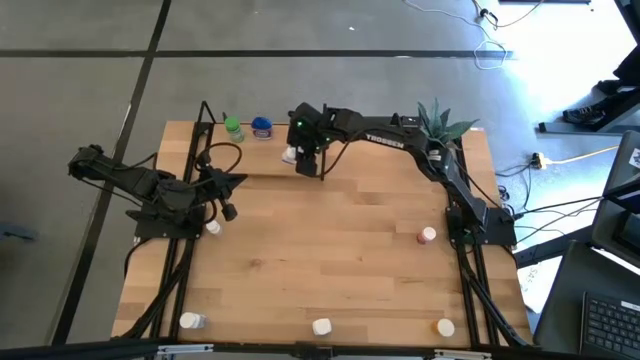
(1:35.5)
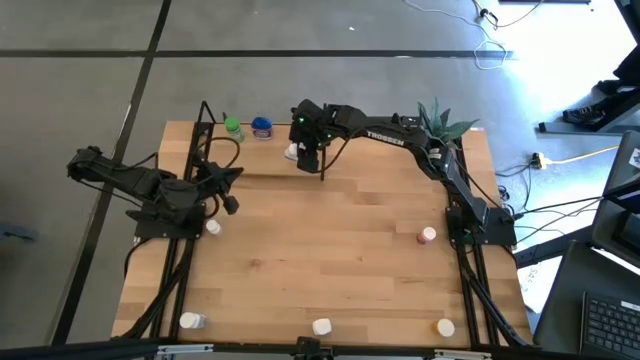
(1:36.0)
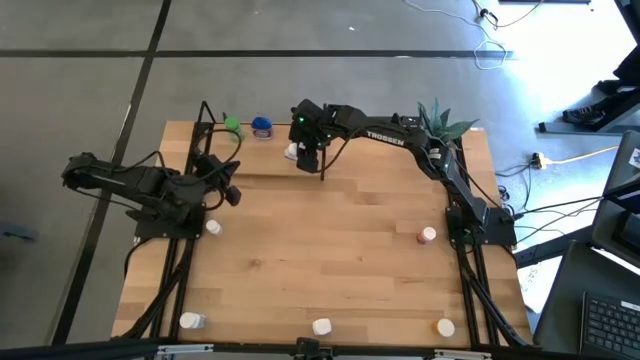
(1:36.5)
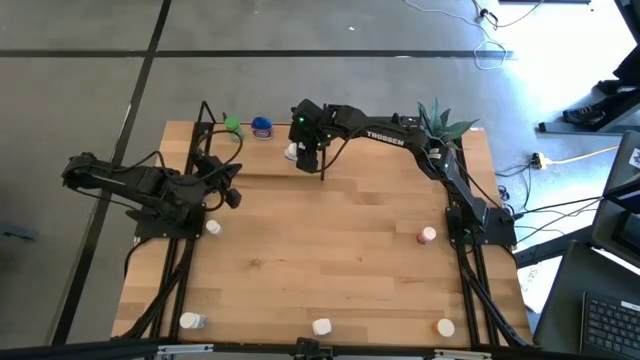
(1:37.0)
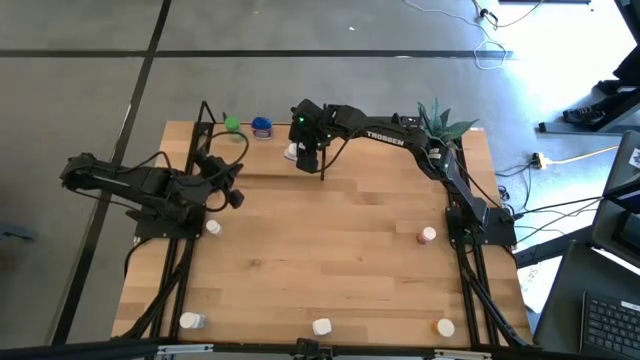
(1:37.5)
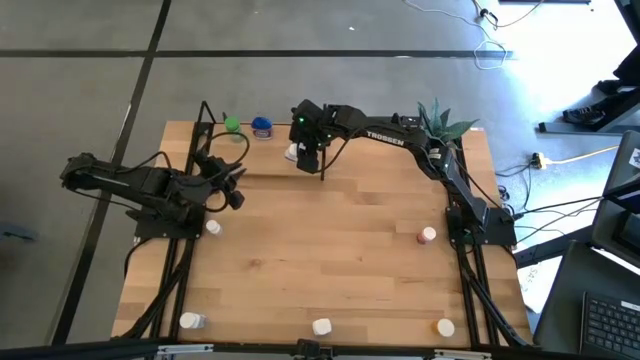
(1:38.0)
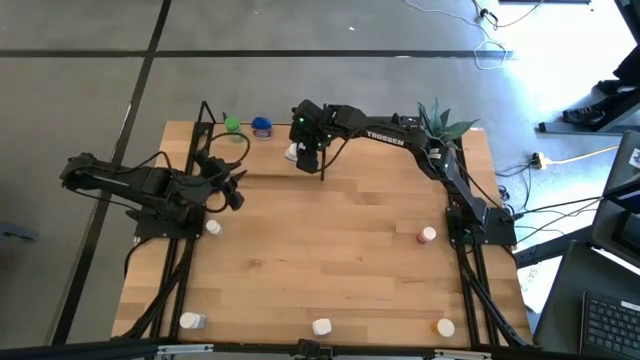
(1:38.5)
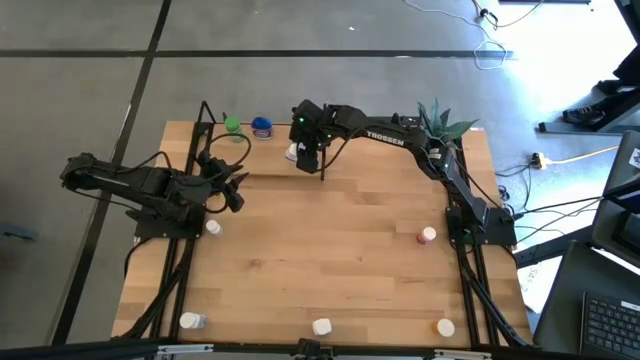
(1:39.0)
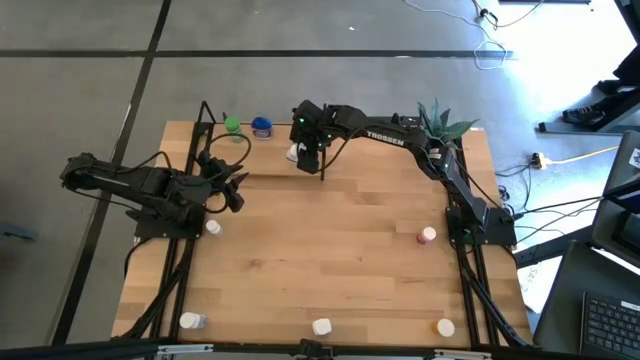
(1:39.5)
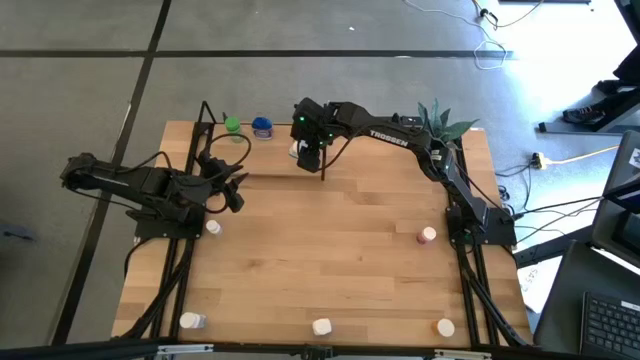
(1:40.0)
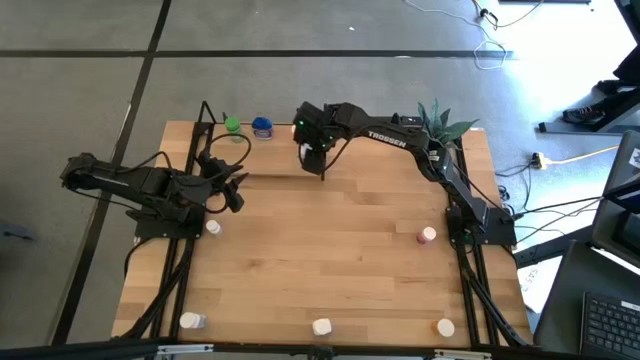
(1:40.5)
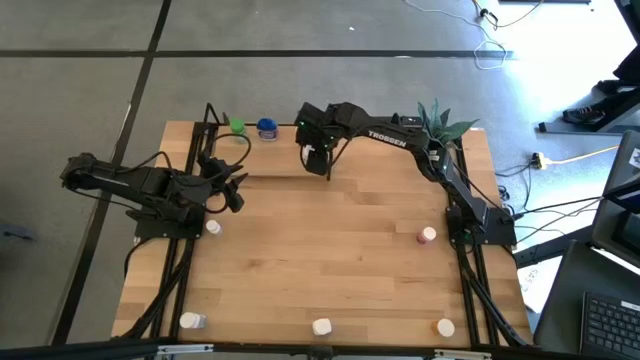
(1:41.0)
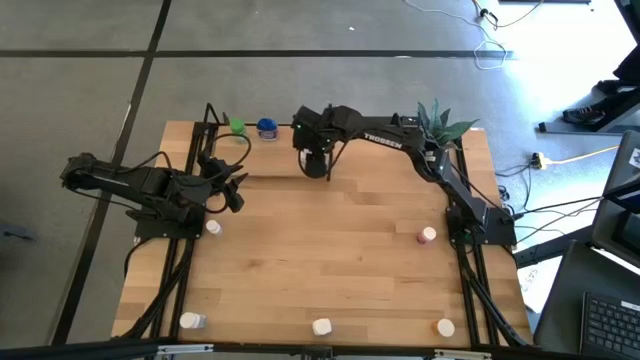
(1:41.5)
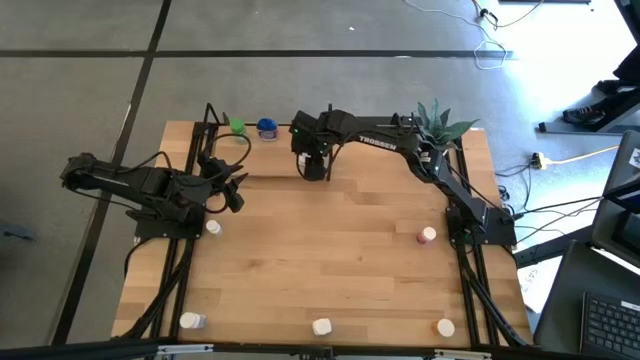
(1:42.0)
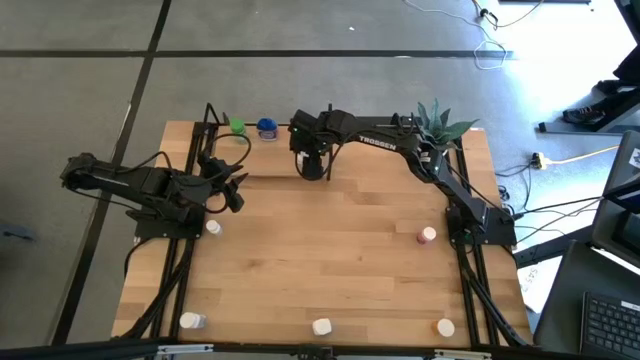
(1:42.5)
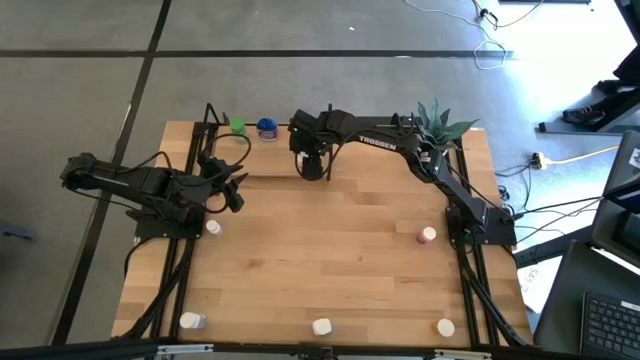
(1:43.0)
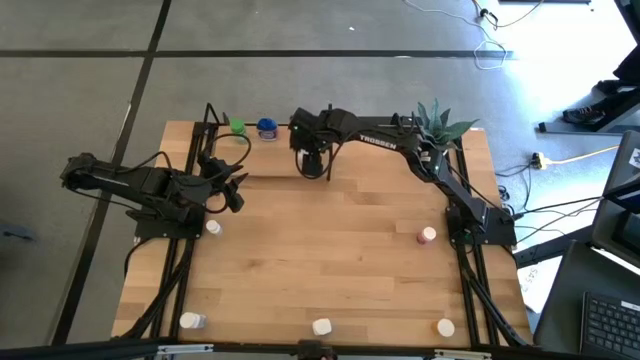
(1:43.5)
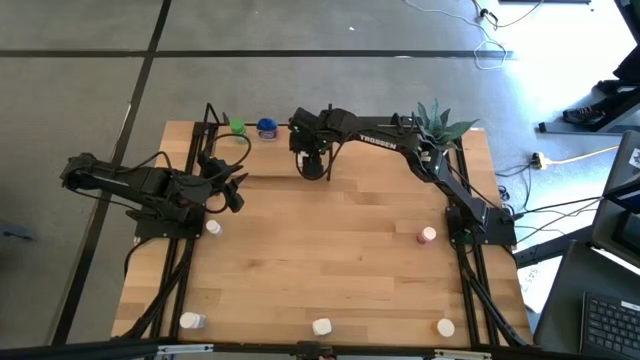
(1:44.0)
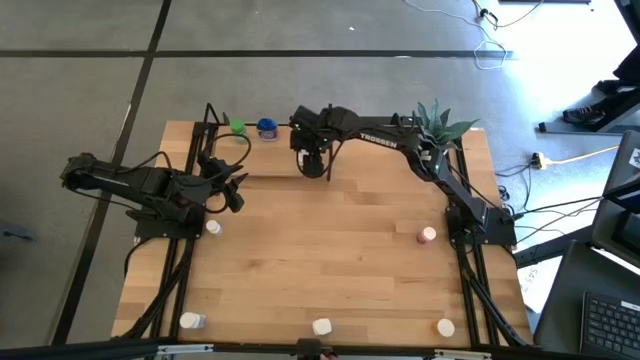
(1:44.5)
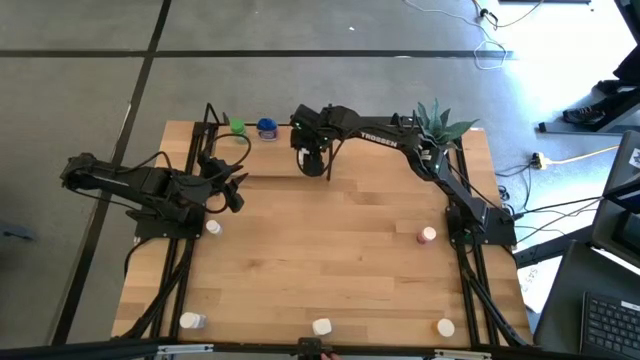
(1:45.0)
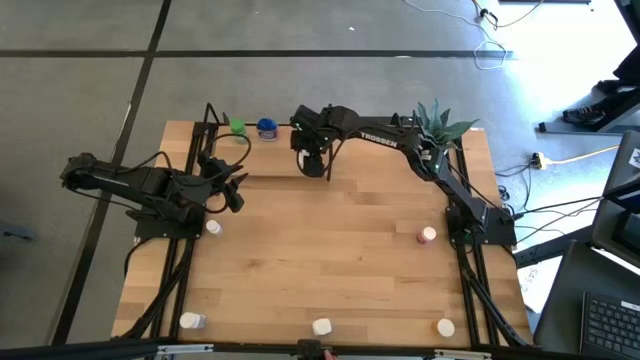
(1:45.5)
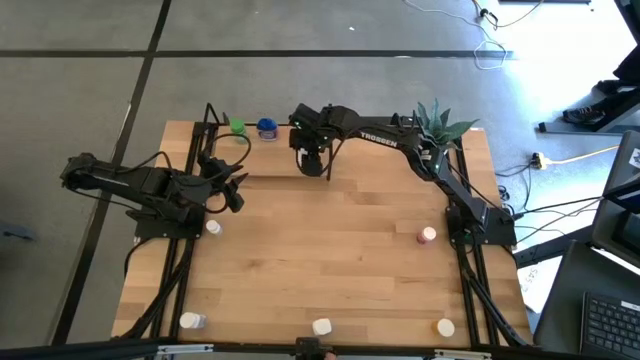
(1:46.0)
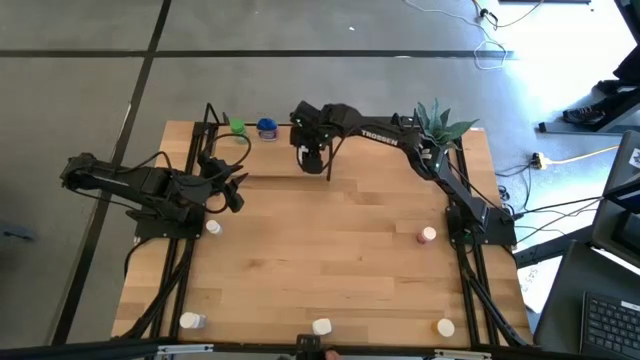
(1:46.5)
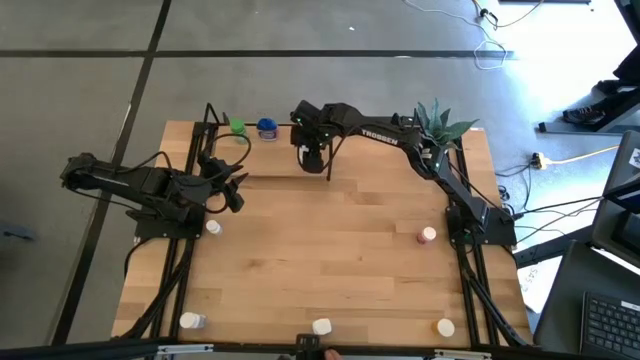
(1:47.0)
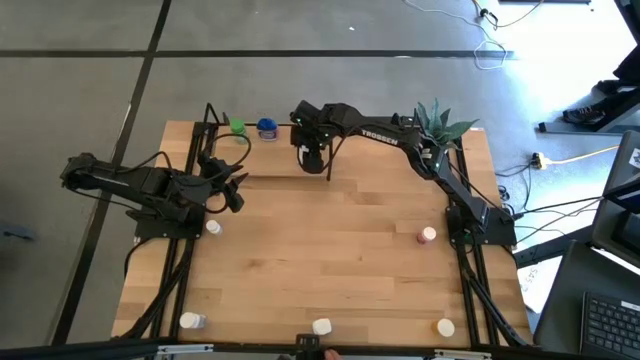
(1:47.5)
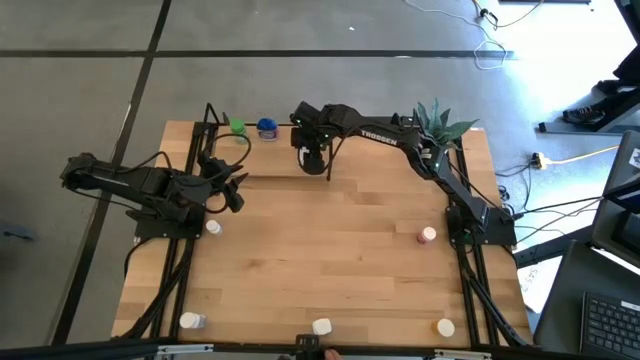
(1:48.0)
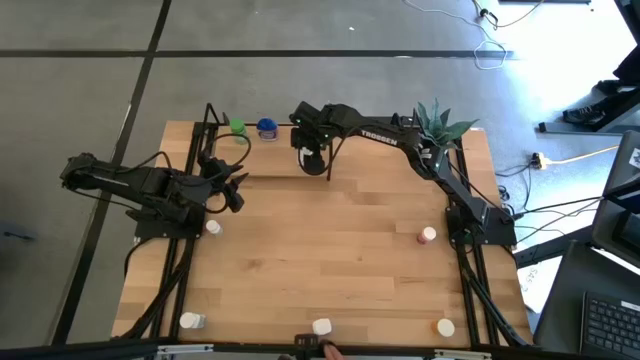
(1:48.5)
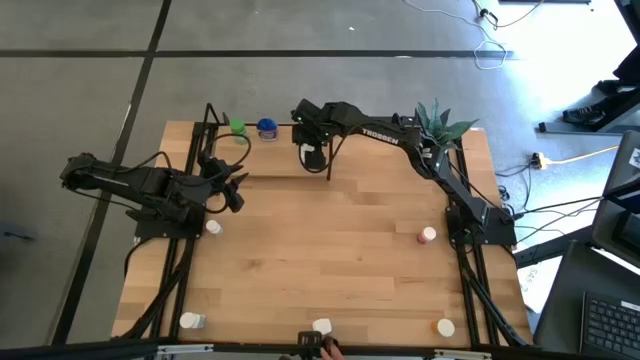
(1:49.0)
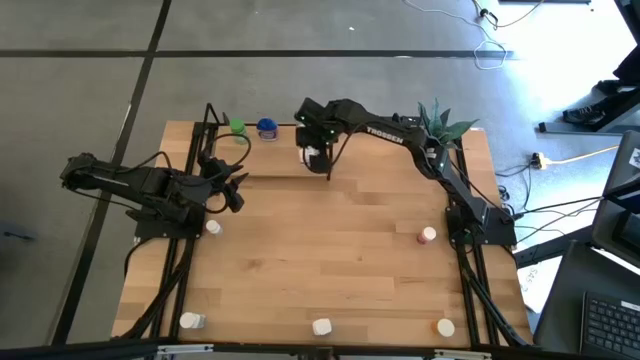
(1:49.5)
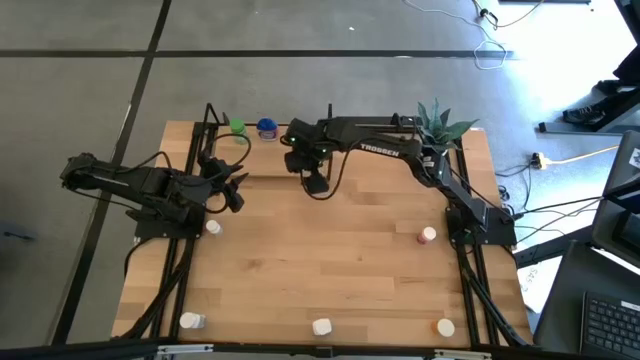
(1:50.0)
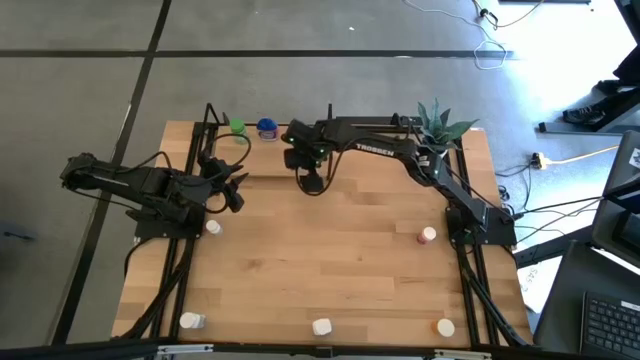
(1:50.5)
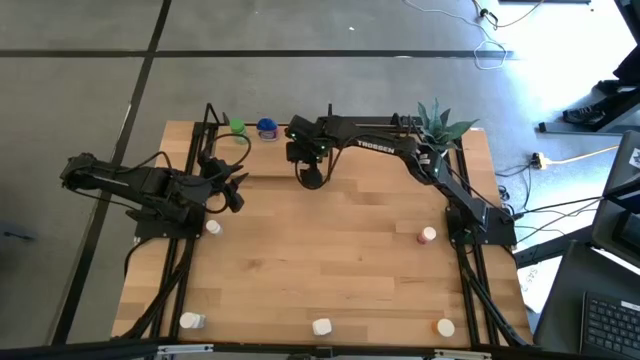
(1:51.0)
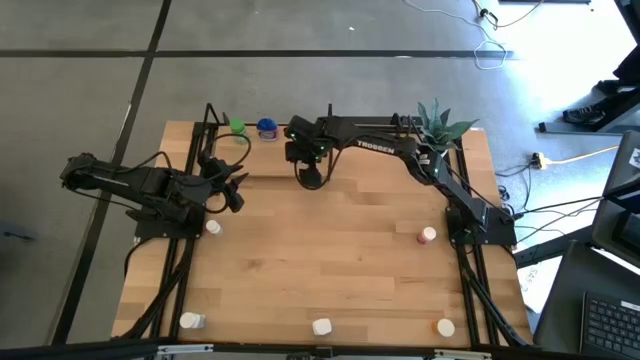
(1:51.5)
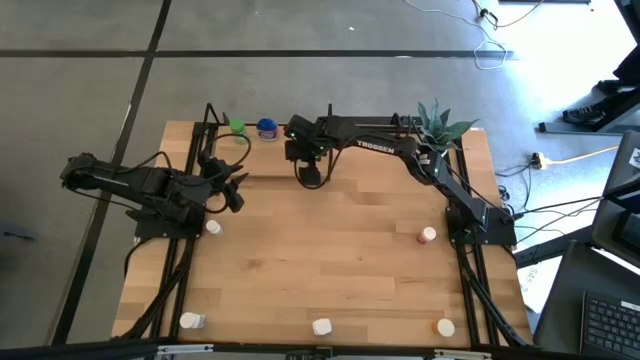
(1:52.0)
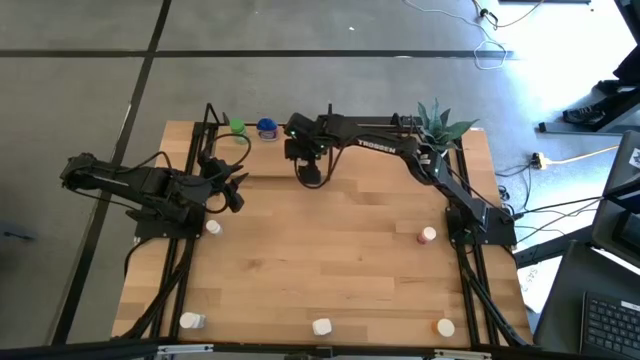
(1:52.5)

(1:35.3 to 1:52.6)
Task: Pick and place medicine bottles onto shelf by color
Put the white pill bottle on the shelf
